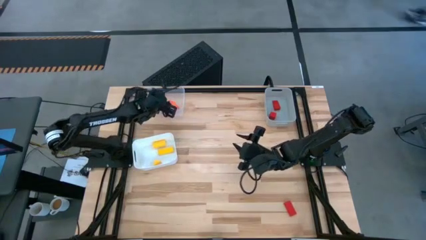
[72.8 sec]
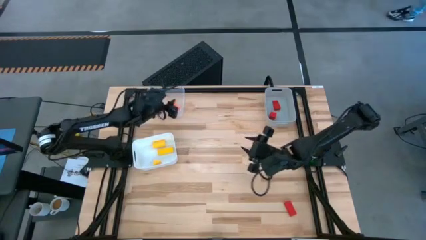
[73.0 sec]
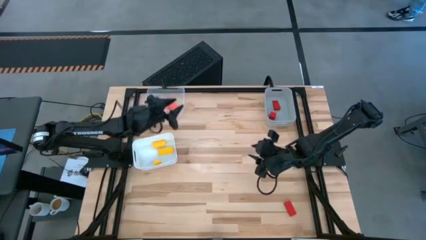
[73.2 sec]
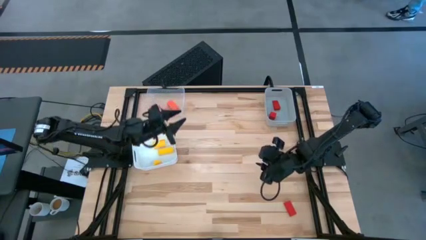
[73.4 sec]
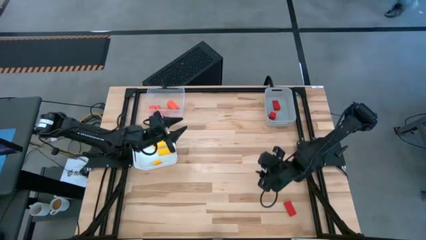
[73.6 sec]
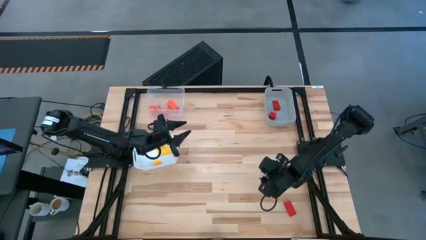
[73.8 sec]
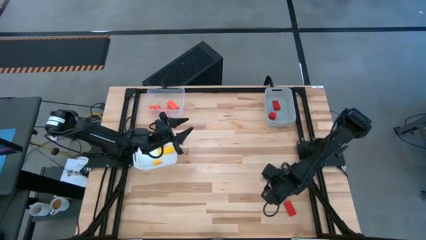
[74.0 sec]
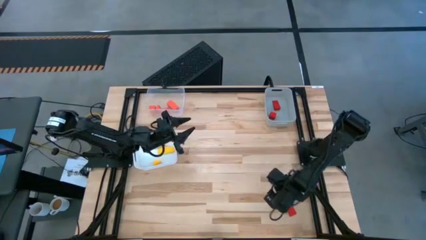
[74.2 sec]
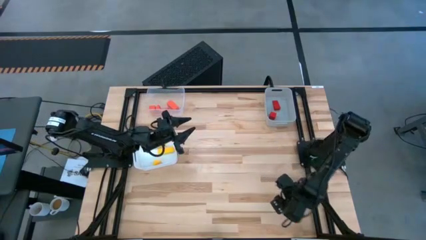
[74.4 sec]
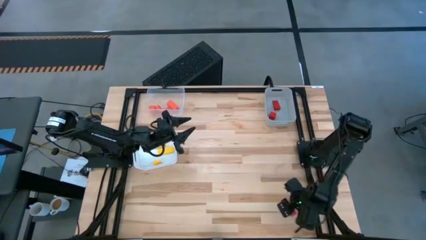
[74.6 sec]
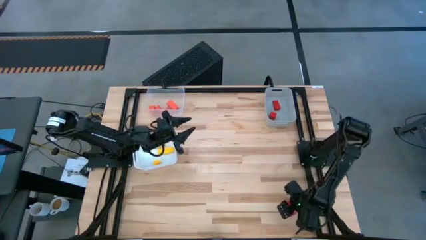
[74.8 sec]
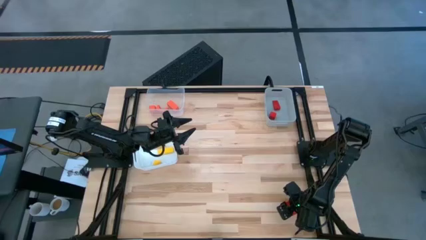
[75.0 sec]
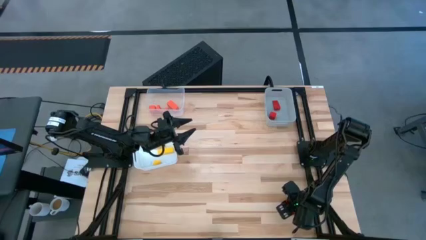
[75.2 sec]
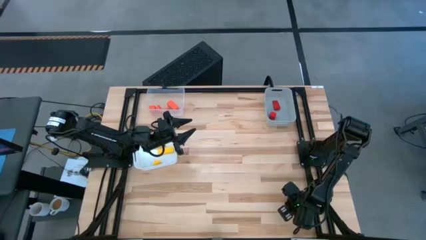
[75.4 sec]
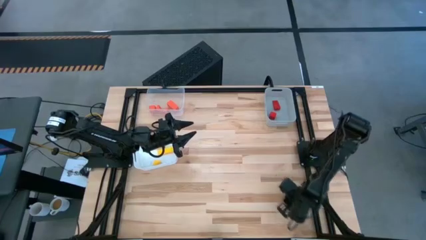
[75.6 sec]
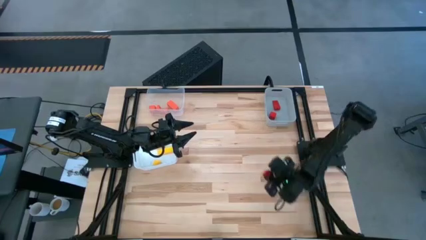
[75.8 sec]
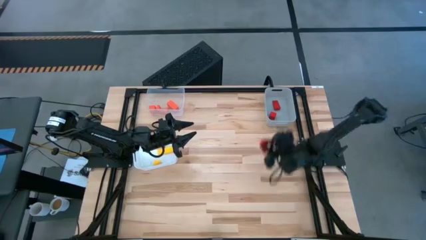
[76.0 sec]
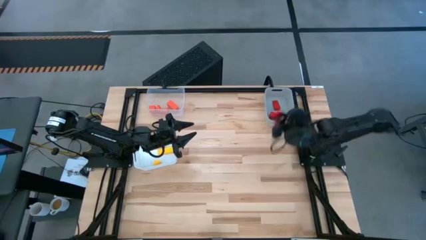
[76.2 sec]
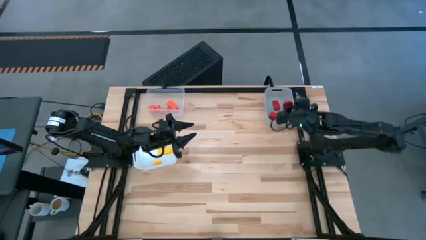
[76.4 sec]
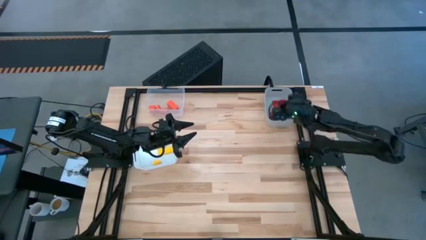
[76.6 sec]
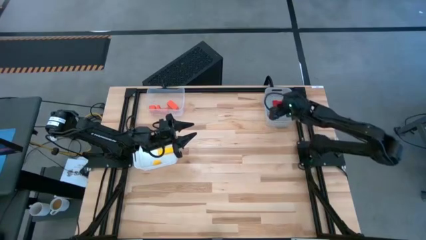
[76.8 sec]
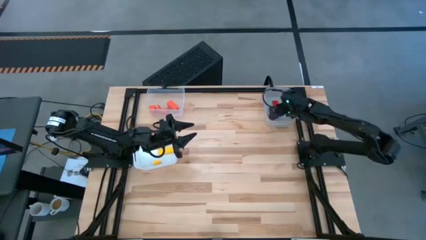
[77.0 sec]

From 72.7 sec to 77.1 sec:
Task: Sort & place blocks by color
Put the red block into the gray bin

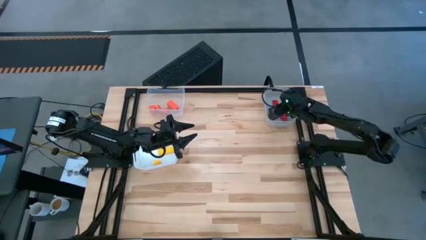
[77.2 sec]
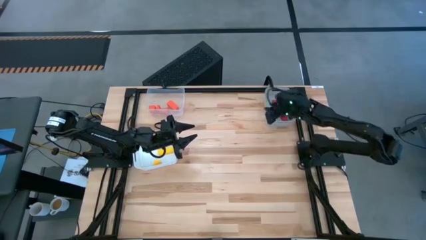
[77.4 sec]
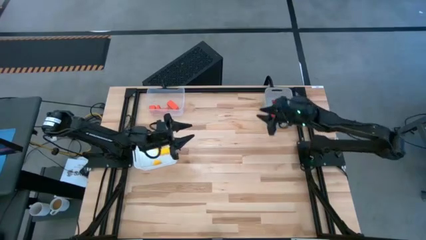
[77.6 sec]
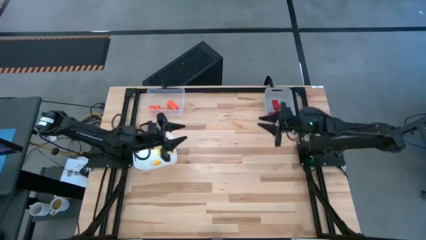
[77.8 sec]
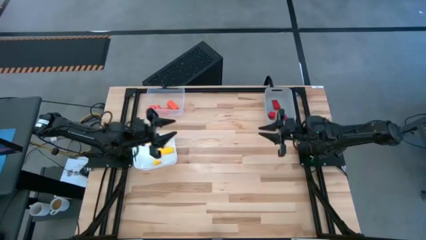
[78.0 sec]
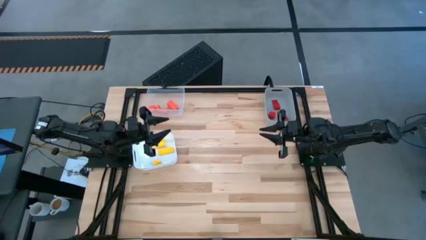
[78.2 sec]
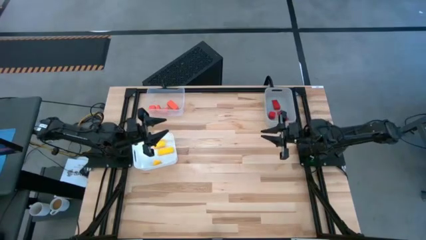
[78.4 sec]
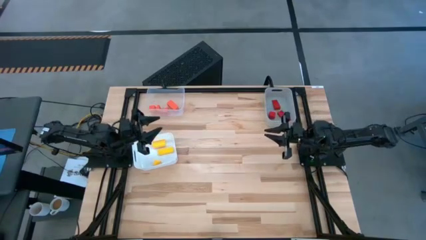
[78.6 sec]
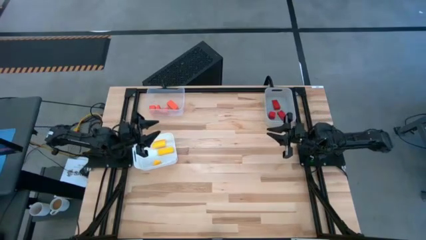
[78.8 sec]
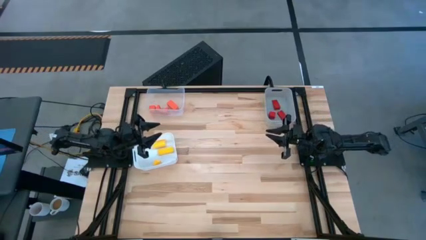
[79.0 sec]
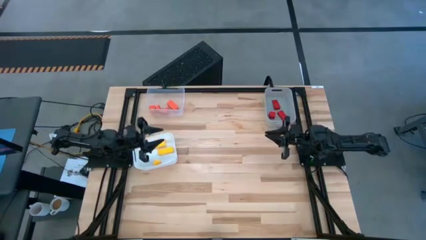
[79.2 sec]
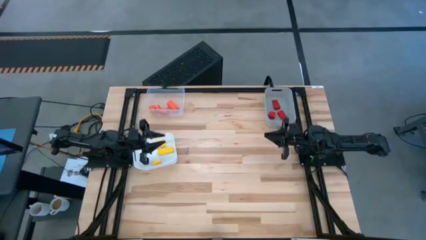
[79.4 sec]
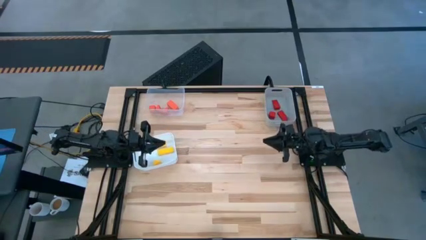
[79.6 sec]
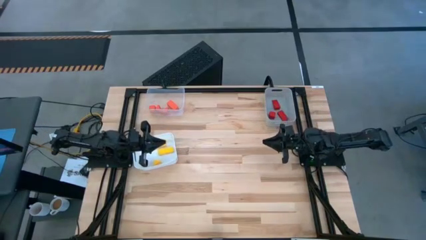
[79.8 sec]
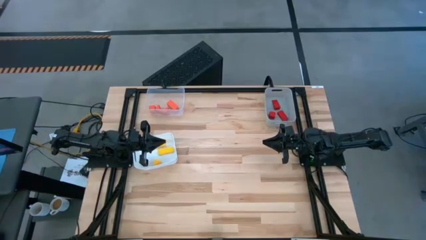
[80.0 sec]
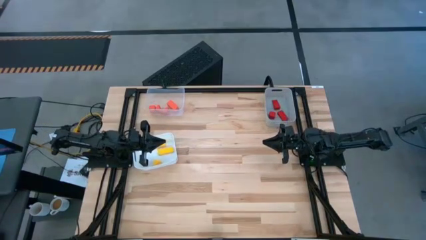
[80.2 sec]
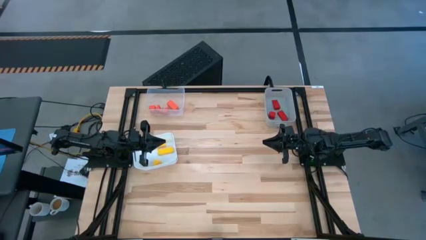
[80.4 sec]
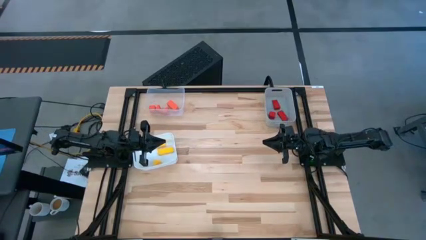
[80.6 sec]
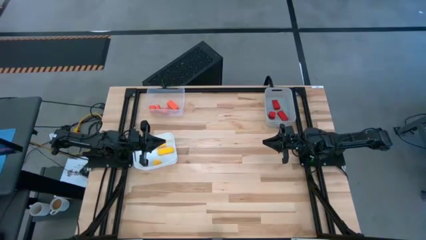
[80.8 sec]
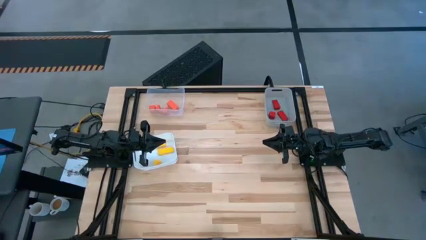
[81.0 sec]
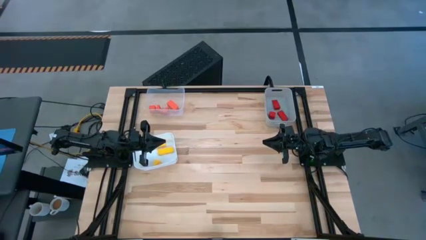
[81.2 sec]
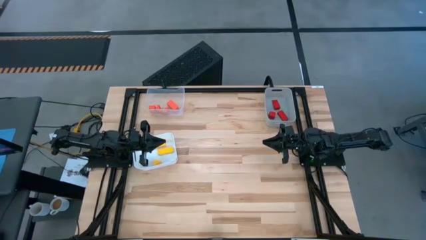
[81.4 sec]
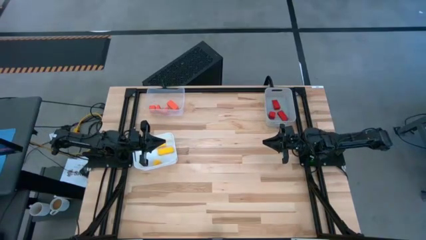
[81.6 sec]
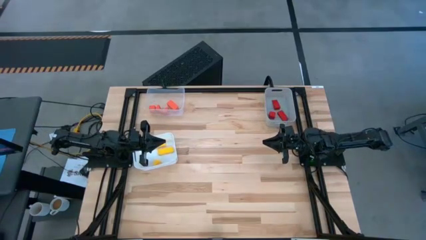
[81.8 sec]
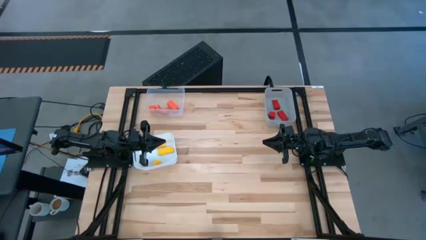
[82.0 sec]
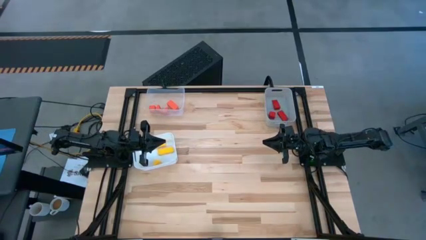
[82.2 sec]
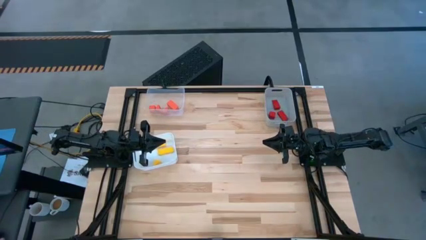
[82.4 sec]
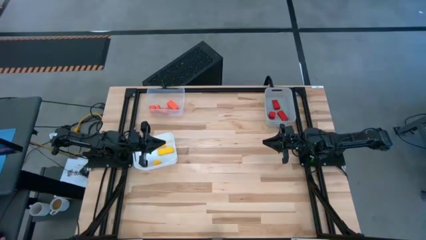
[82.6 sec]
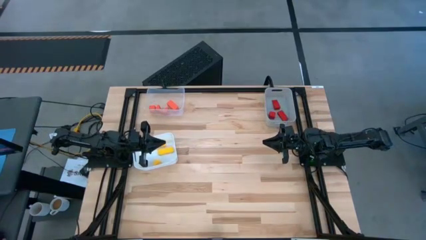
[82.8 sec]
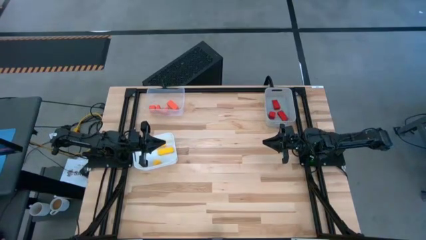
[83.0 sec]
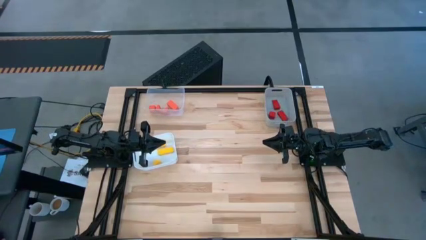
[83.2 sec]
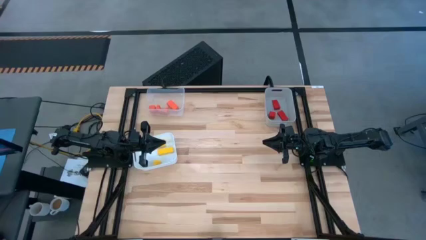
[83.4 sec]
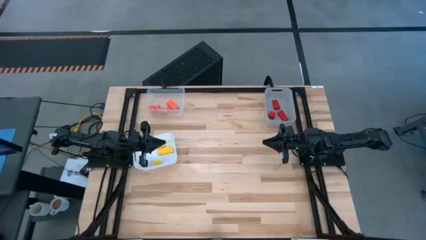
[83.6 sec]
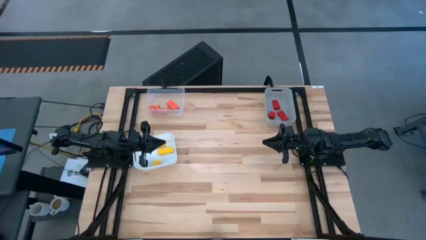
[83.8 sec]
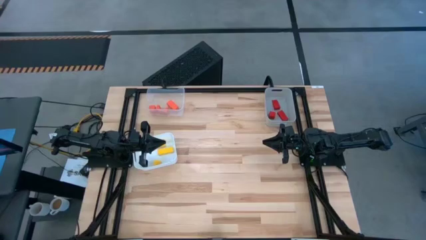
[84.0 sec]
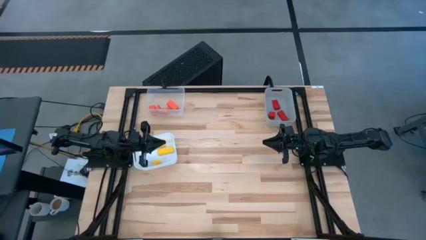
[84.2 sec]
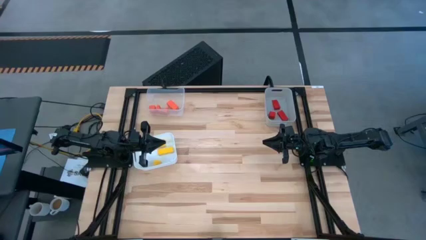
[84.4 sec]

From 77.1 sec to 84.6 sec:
Return to Home Position

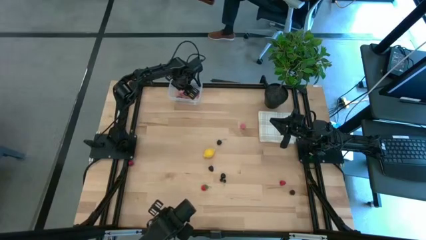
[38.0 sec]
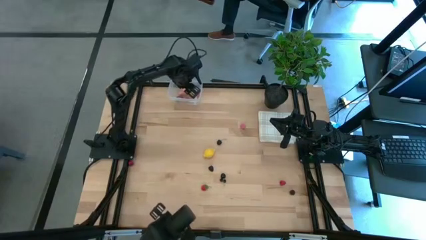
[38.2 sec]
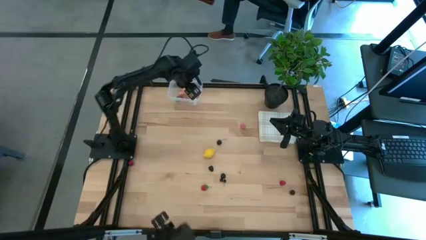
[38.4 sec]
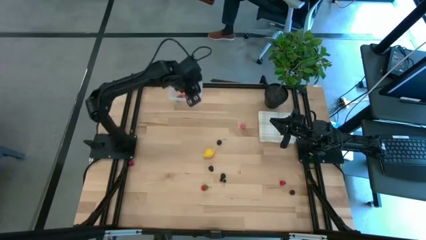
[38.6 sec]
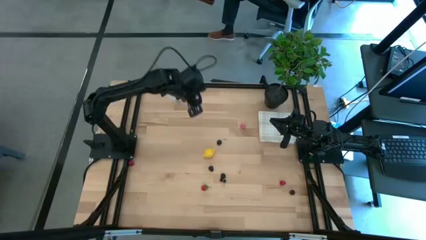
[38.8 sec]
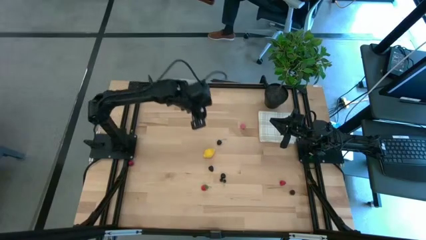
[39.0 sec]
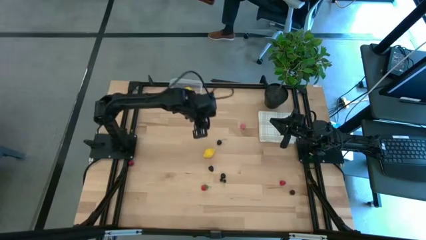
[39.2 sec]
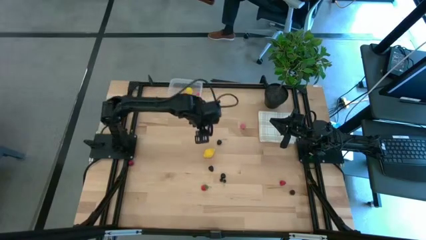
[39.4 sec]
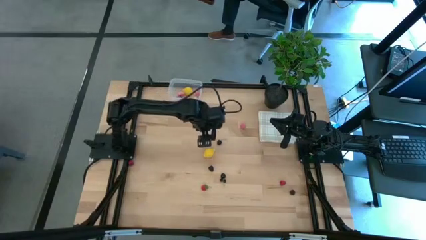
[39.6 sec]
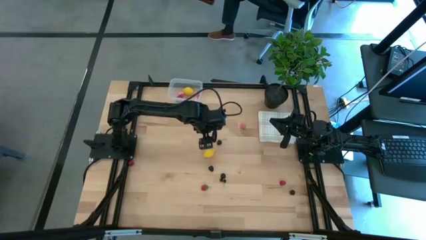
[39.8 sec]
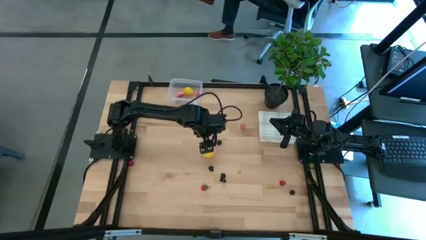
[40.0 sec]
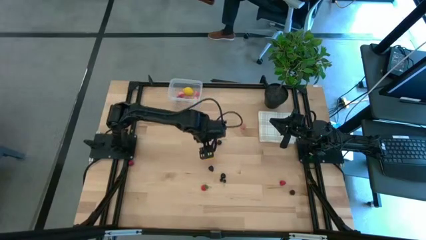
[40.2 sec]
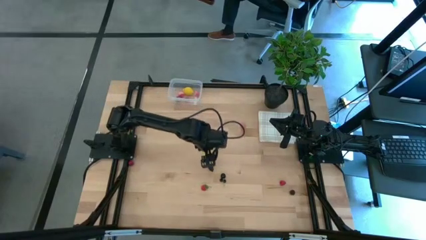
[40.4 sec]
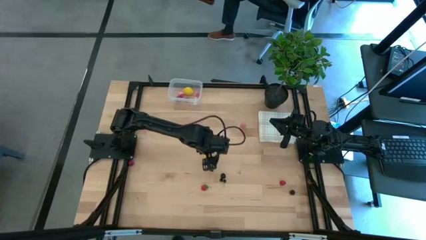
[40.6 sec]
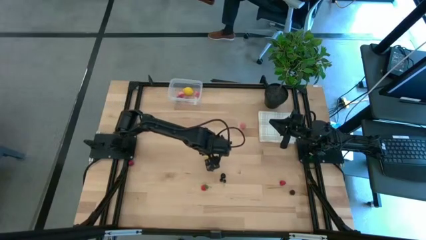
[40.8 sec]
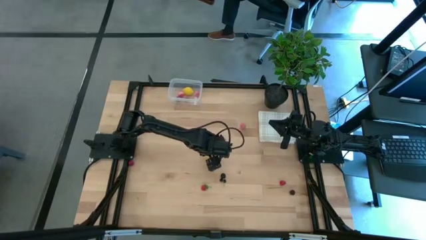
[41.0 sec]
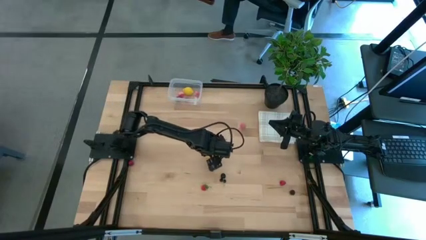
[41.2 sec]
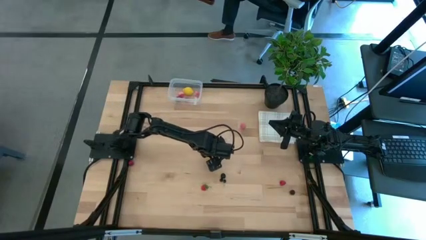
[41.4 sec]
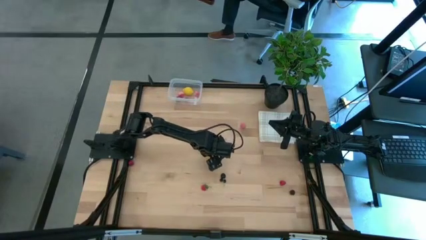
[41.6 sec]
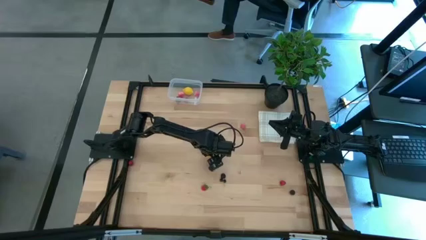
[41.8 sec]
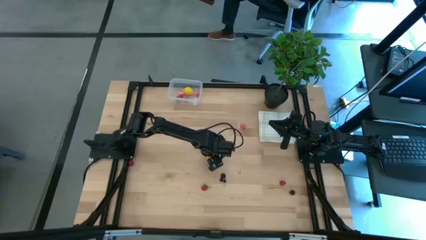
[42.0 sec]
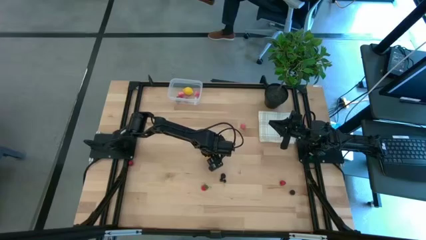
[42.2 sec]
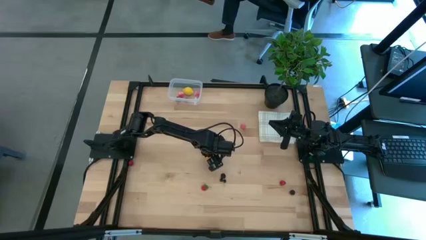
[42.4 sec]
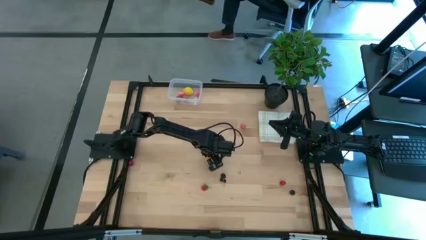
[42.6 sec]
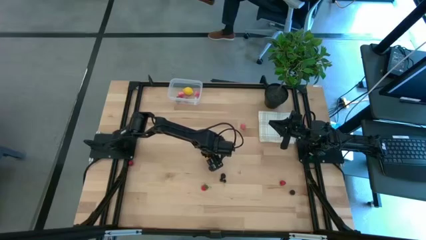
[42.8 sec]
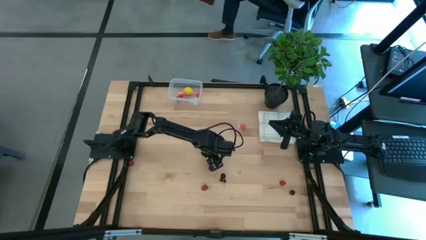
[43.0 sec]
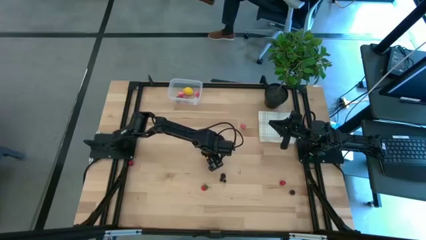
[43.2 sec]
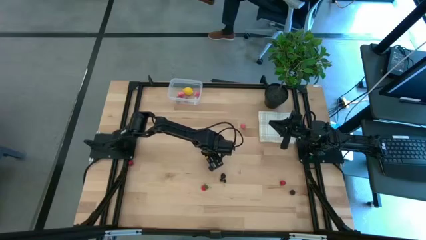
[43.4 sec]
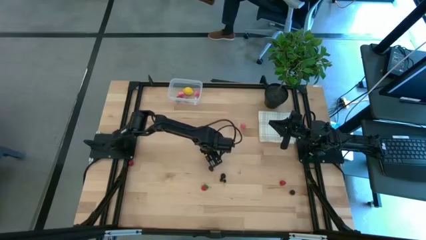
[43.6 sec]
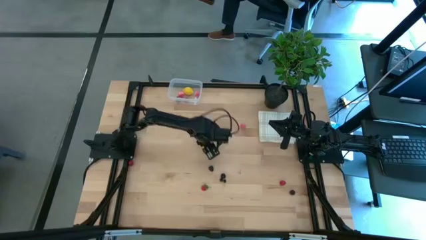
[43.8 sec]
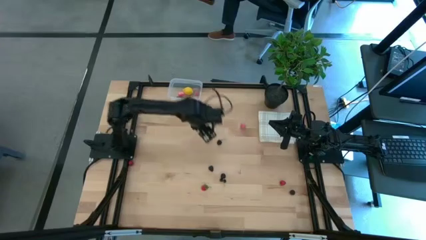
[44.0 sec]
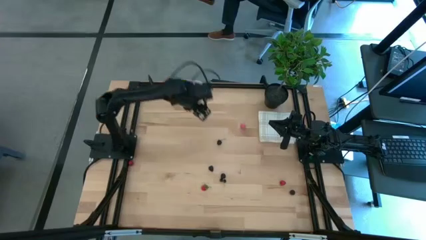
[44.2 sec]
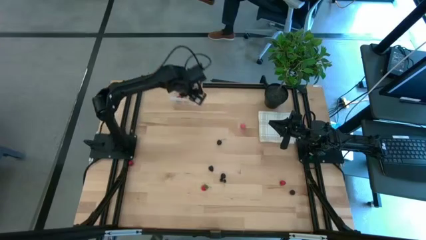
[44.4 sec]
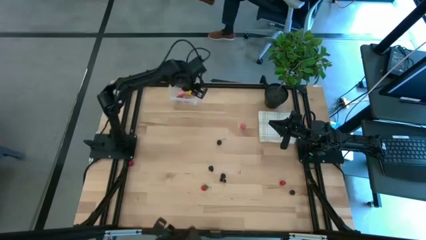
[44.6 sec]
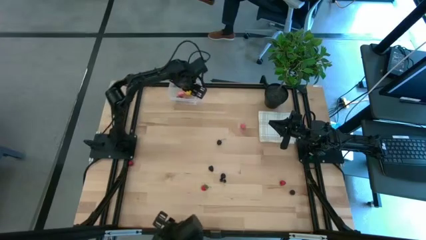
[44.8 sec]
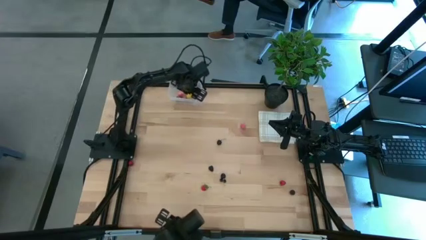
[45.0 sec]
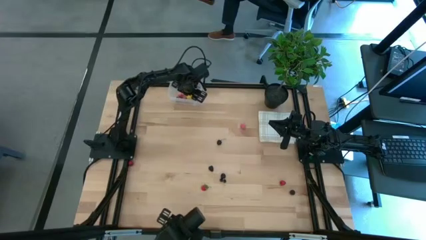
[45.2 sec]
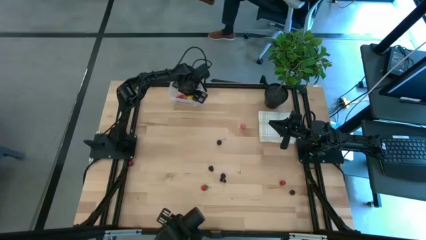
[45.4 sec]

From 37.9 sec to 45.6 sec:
Task: Pick and placing Produce into tupperware
Put the yellow lemon into the transparent bin
